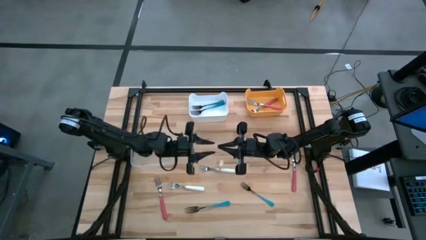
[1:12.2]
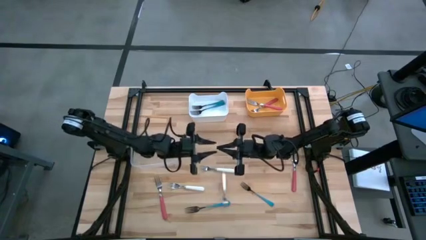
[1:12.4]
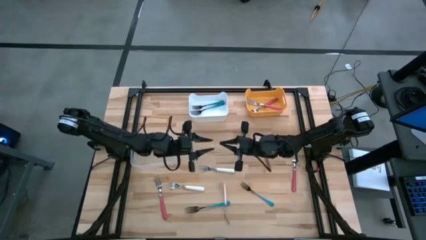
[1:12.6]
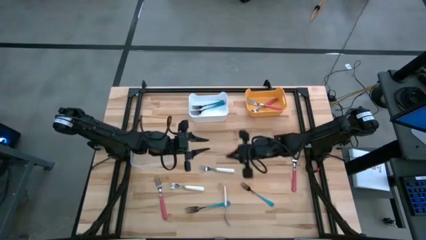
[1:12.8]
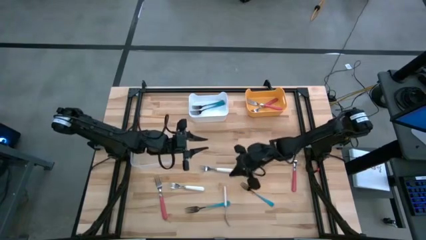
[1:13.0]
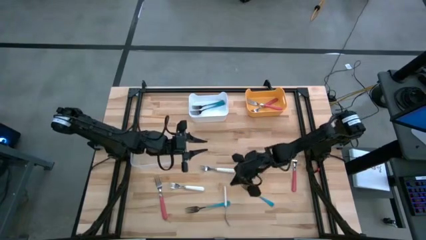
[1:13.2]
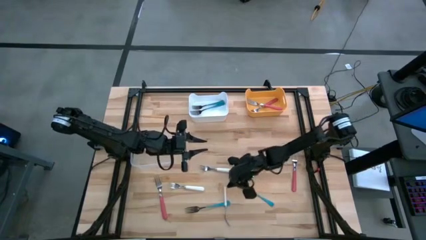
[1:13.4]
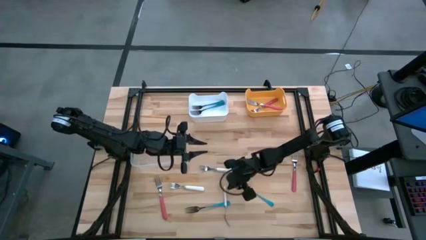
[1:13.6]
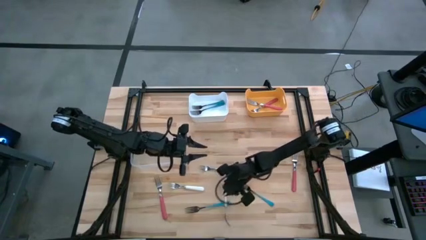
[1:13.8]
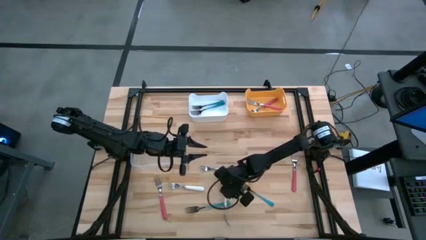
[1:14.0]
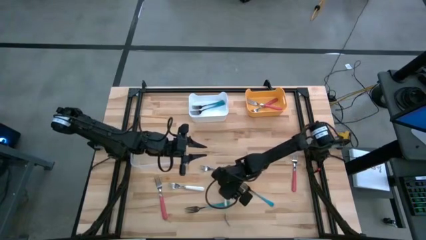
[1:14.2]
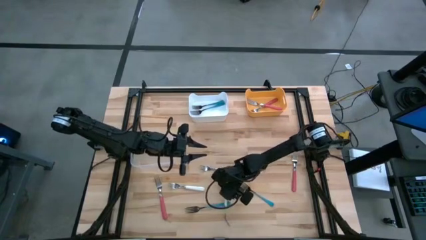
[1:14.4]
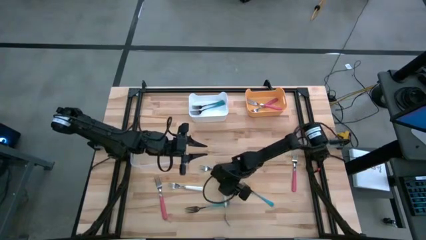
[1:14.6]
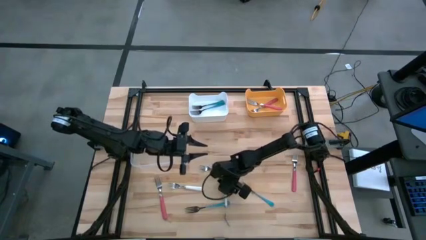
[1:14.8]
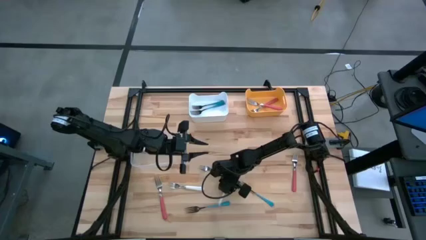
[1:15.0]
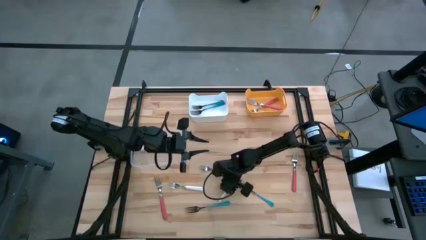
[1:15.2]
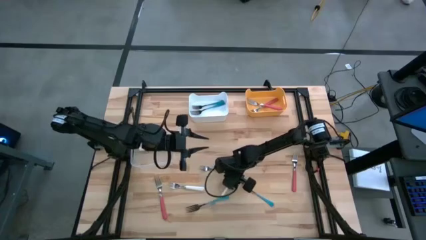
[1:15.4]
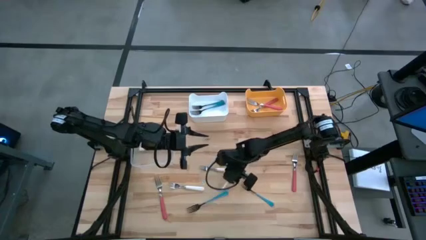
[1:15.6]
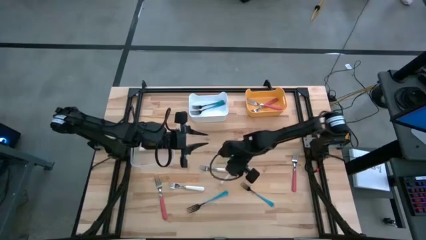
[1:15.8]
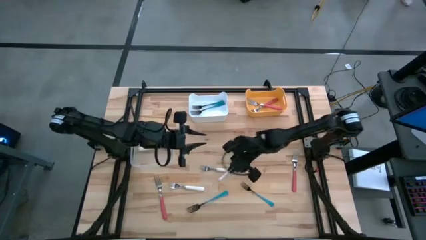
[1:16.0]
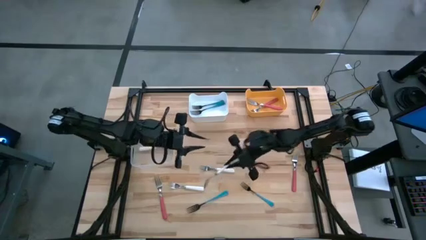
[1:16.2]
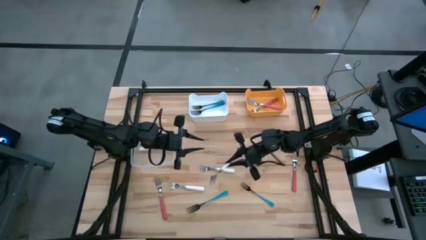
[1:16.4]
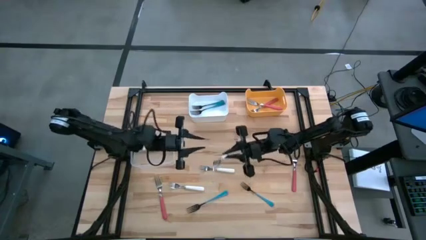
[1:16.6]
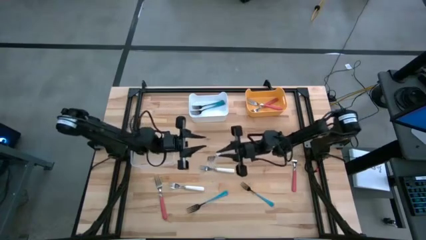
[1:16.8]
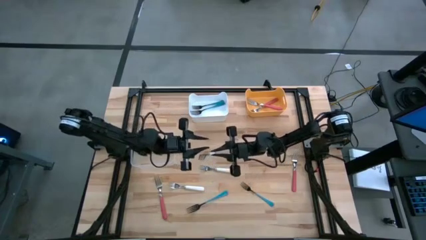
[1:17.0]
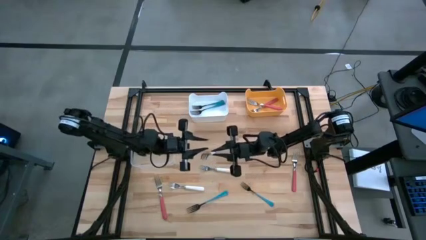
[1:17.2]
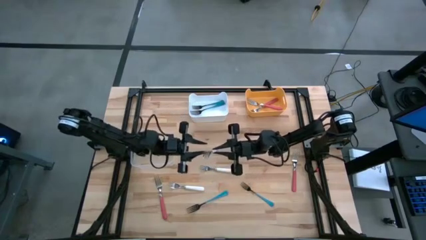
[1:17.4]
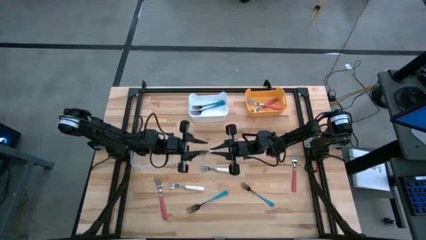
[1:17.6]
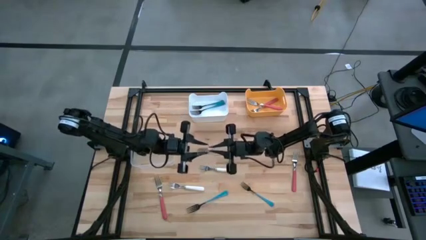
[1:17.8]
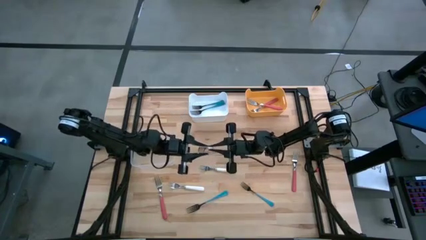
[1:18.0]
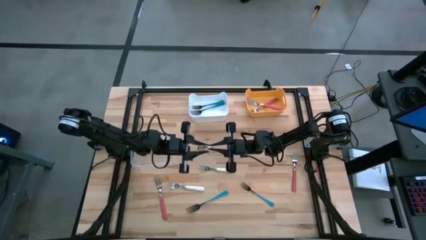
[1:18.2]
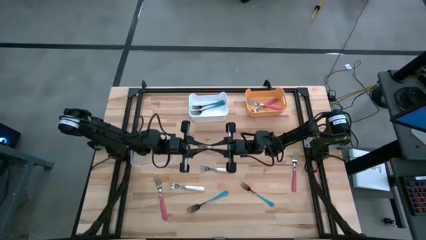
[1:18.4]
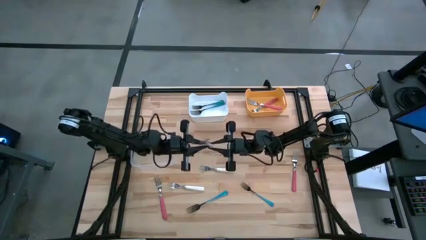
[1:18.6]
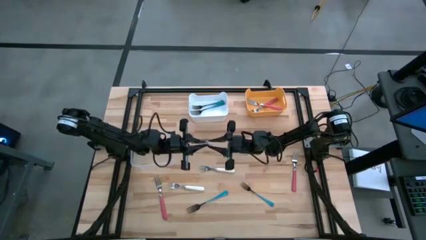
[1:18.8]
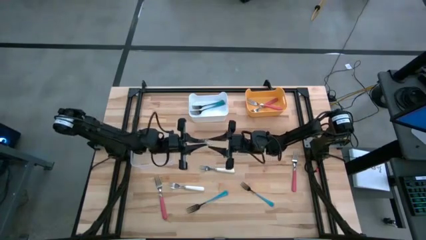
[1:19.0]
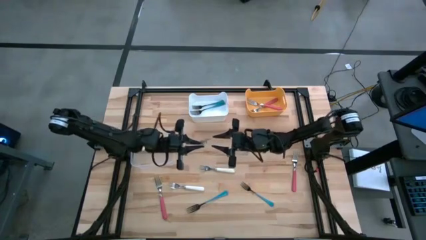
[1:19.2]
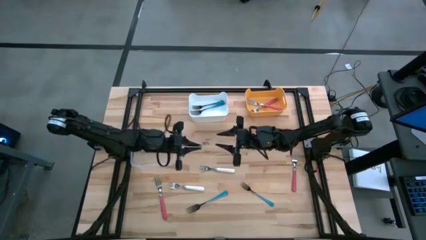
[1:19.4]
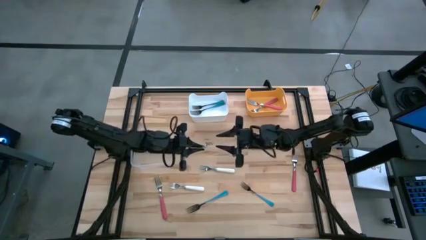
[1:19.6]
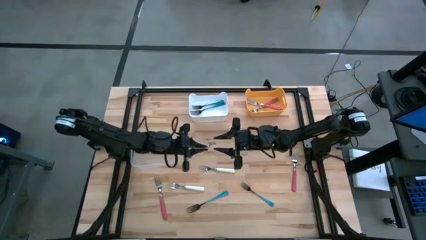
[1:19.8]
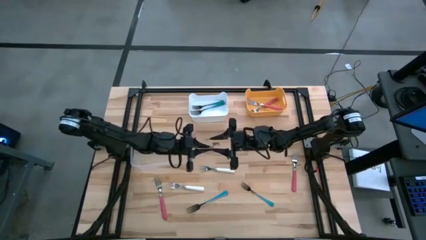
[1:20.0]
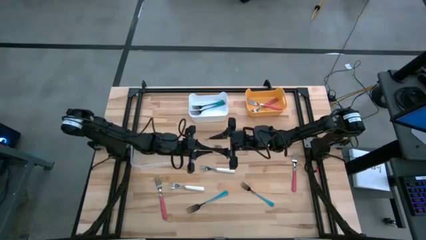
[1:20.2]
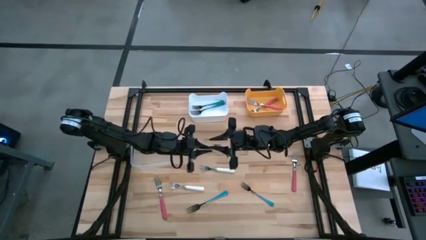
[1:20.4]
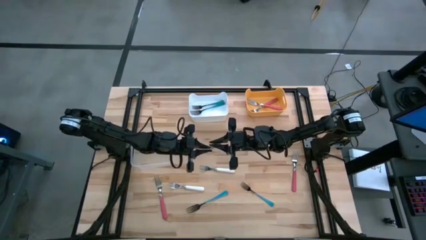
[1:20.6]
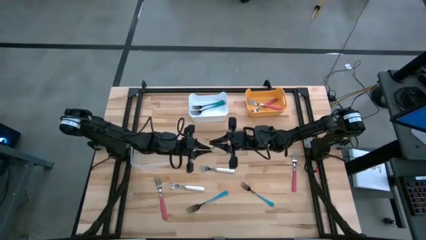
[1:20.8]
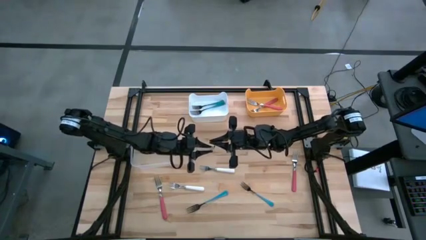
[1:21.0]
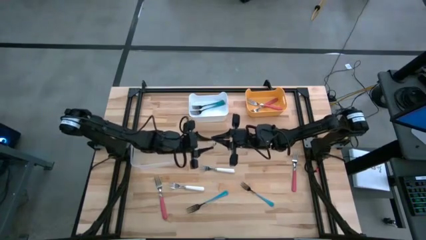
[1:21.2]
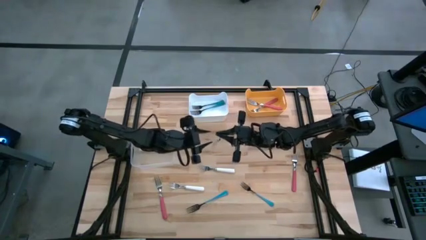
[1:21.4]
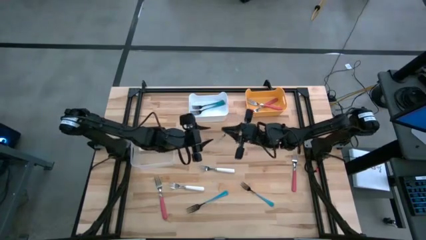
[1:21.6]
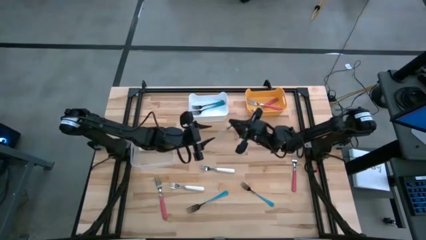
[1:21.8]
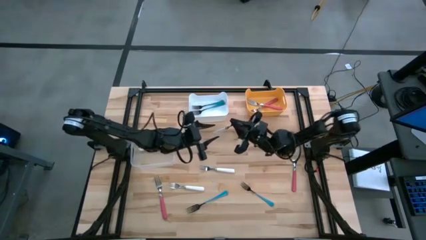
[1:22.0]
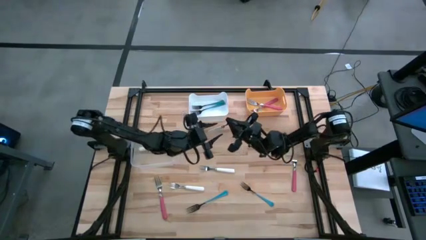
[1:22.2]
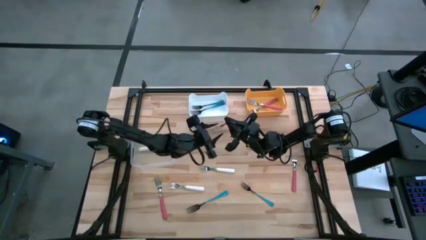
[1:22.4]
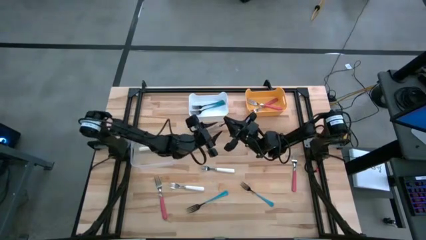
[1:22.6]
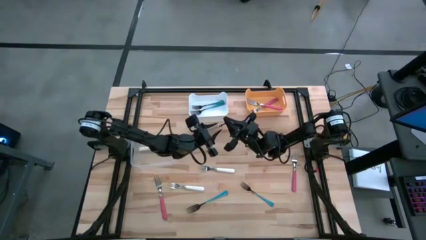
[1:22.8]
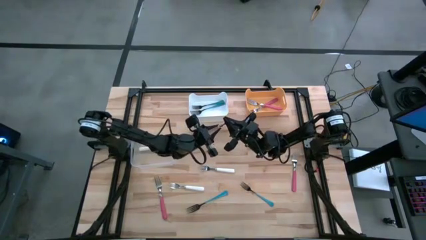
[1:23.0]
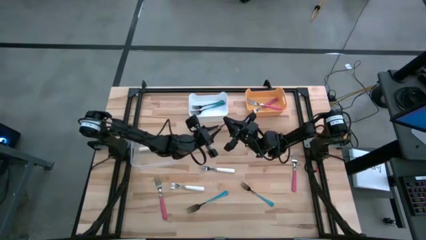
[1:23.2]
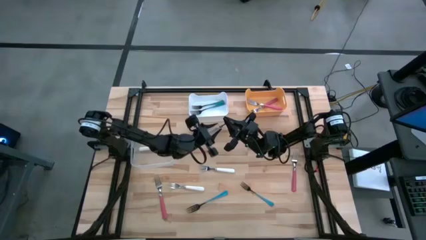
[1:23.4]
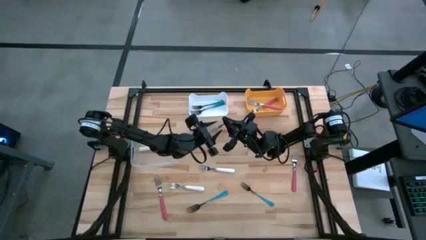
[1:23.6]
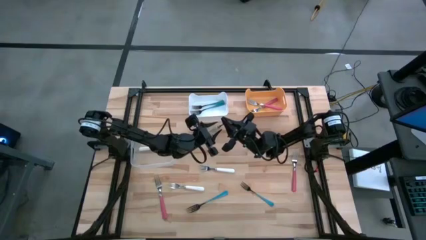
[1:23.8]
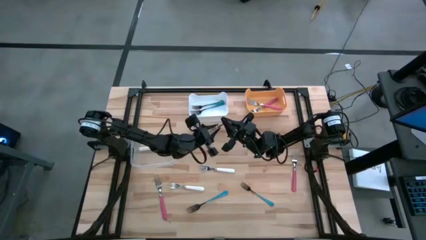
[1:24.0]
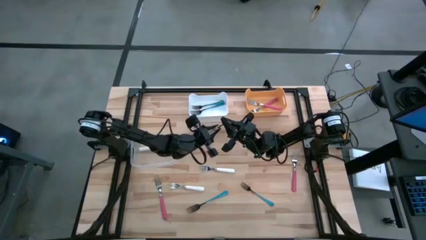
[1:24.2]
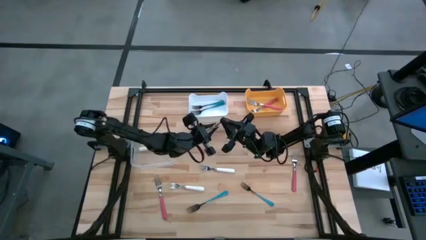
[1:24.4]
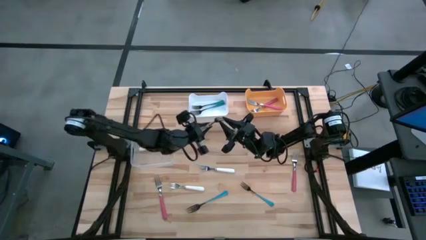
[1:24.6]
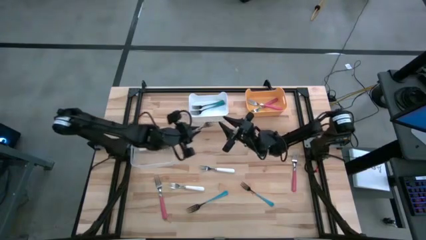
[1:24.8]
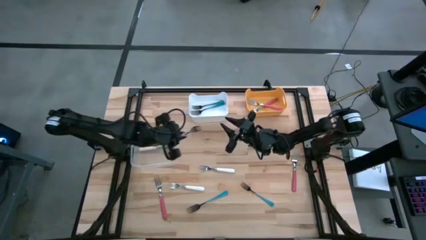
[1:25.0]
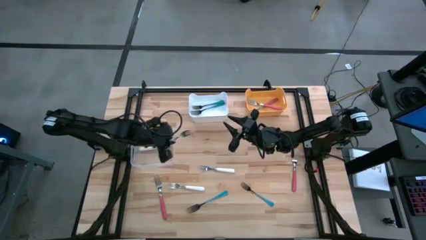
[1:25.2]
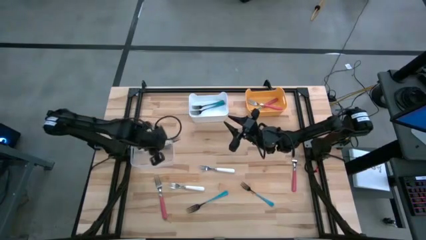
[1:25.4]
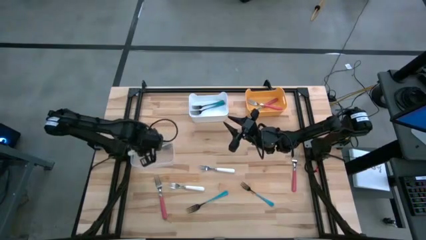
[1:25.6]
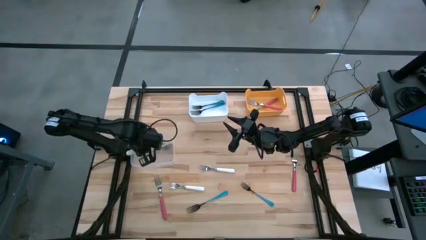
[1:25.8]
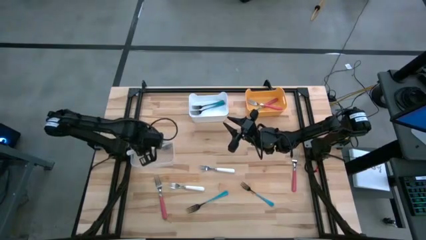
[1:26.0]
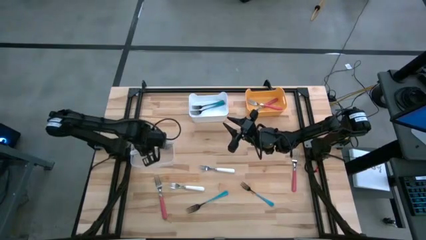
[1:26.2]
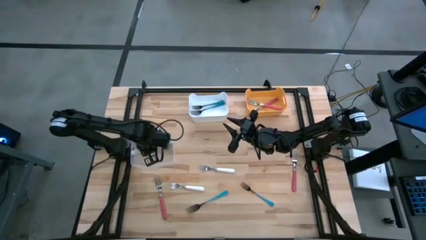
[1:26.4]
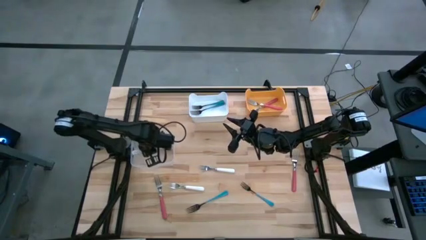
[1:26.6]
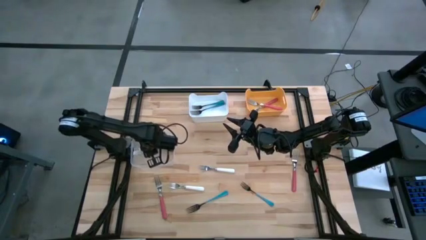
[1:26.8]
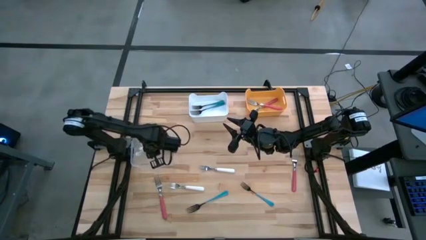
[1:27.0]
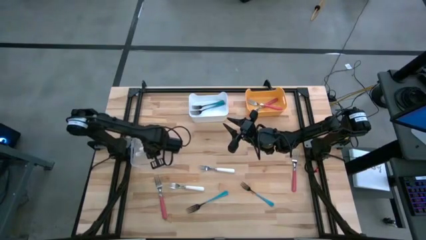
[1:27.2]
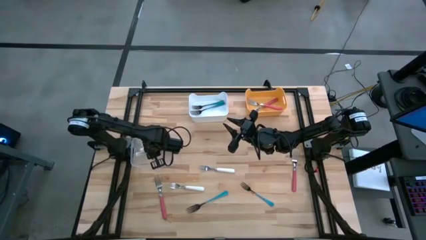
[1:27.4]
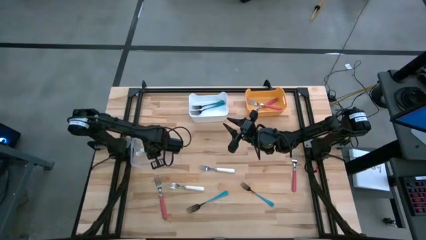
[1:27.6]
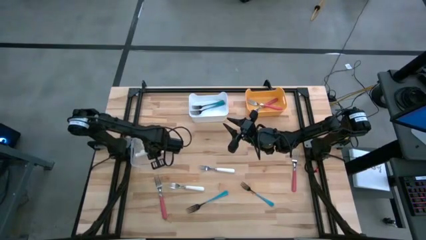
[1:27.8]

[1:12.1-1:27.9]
Task: Sort silverware by color (type)
Put the top white fork into the transparent bin

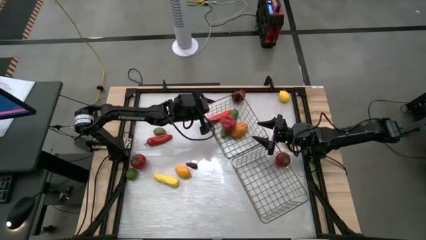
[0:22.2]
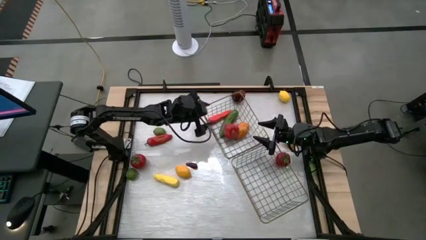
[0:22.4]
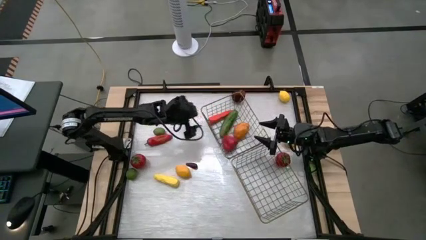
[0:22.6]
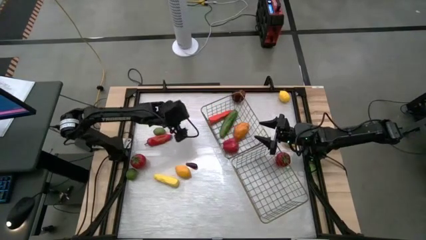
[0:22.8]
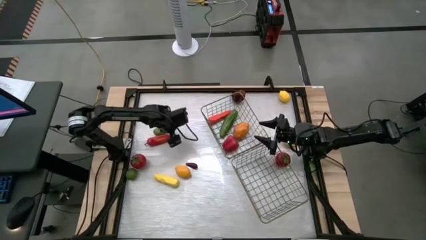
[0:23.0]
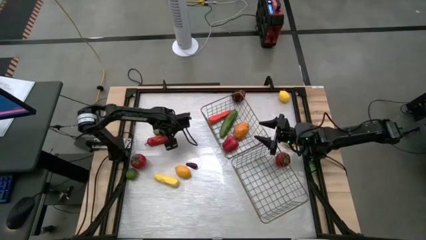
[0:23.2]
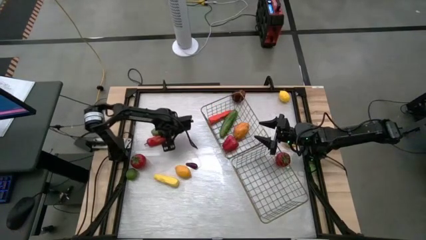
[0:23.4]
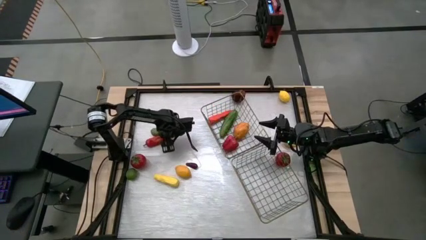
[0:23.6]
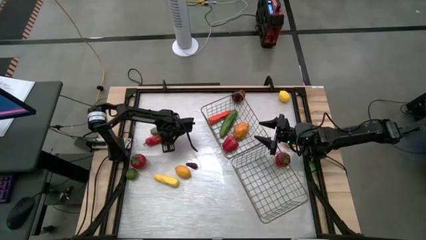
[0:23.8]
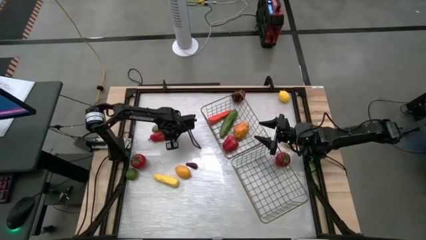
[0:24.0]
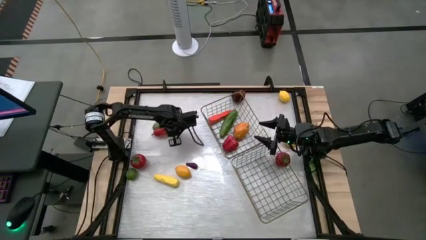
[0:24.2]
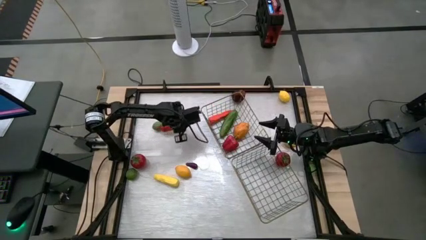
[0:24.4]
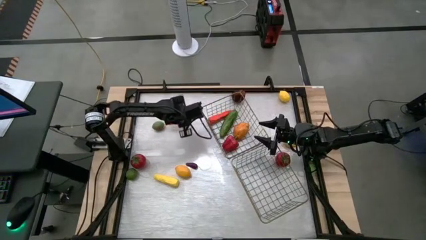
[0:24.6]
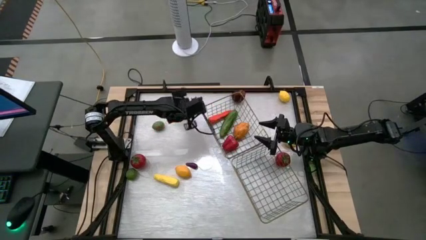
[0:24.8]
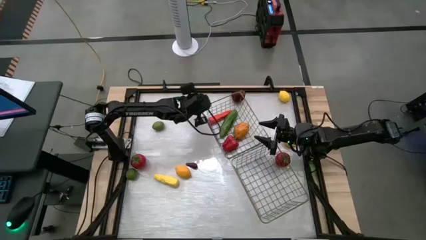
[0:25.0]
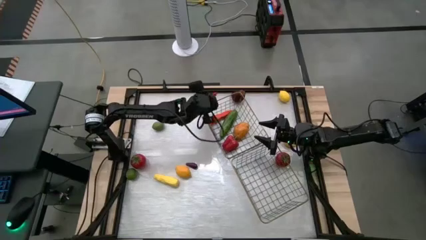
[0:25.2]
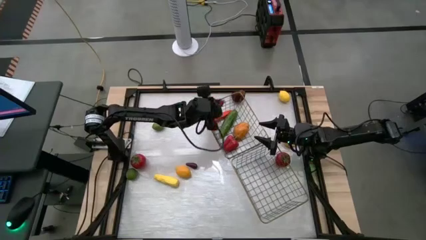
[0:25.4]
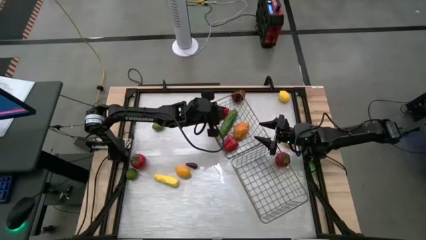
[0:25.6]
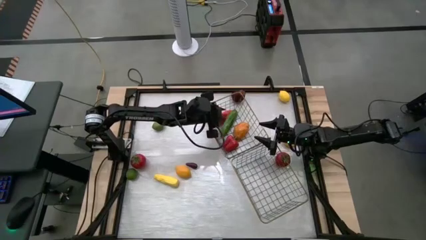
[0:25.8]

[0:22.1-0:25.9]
Task: Sort produce into baskets
Put the chili pepper into the left wire basket
